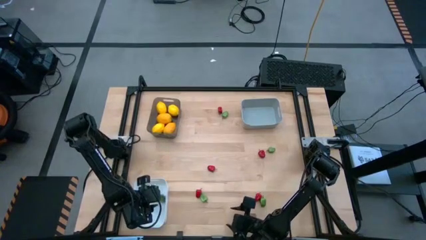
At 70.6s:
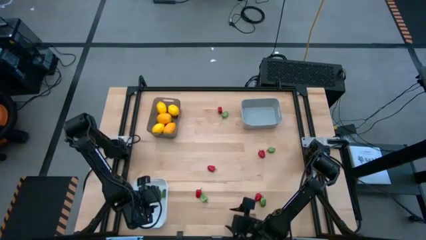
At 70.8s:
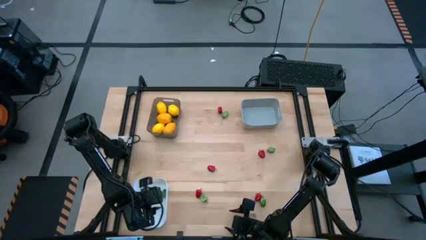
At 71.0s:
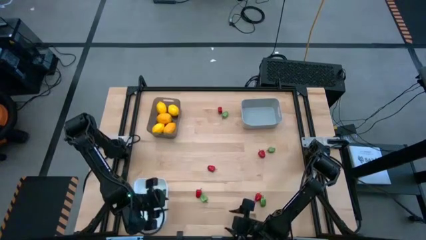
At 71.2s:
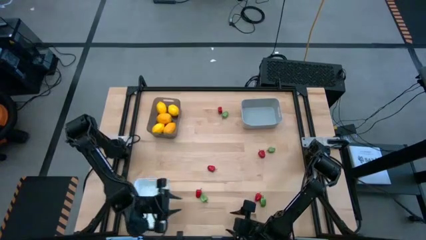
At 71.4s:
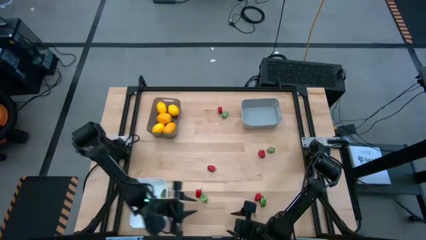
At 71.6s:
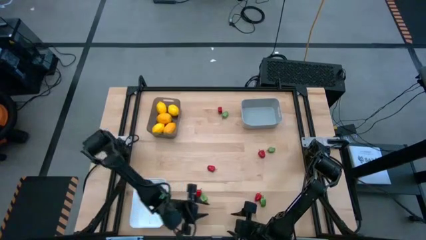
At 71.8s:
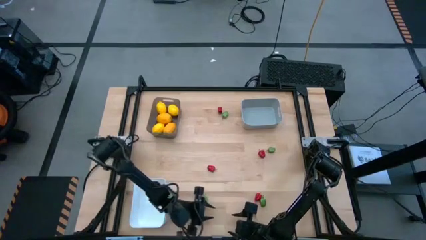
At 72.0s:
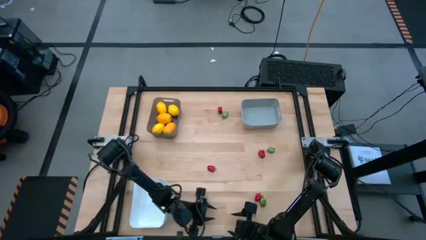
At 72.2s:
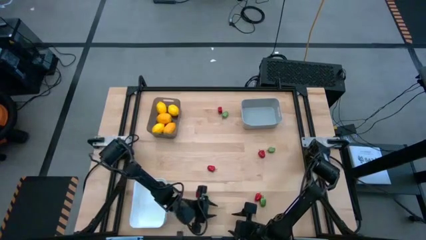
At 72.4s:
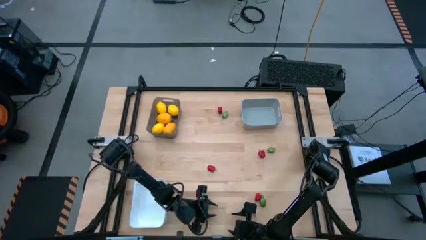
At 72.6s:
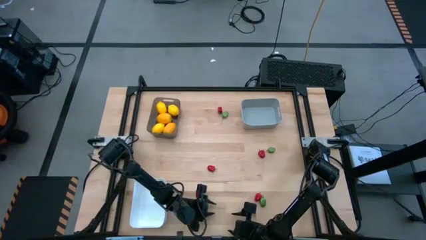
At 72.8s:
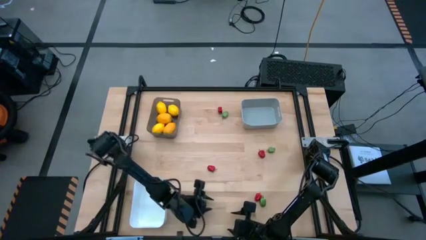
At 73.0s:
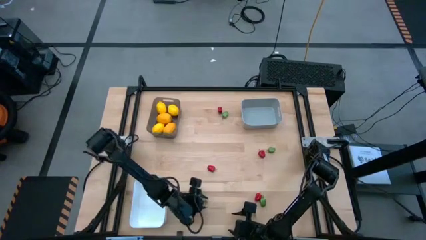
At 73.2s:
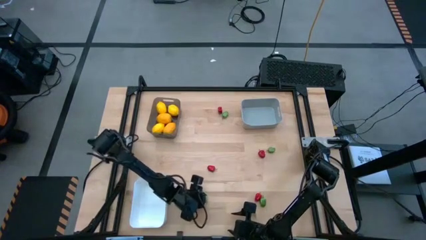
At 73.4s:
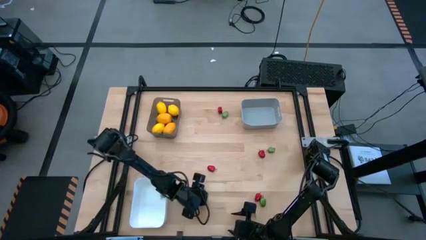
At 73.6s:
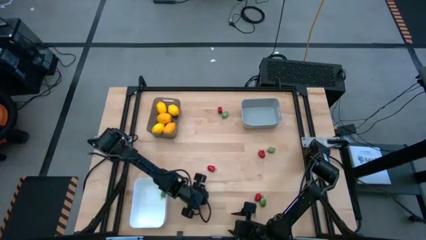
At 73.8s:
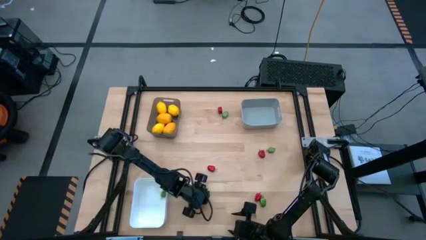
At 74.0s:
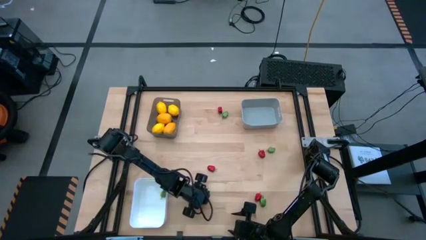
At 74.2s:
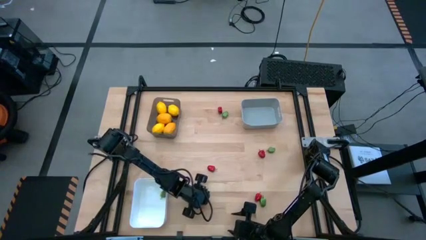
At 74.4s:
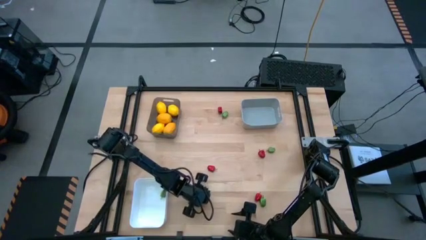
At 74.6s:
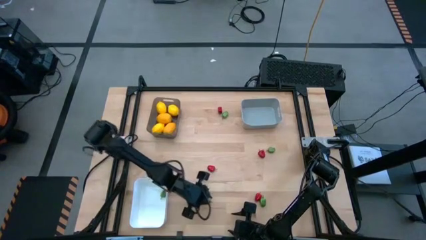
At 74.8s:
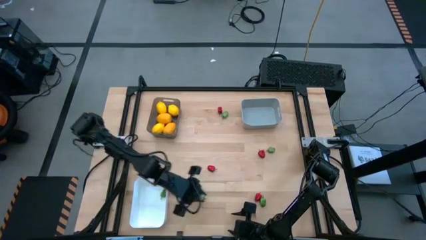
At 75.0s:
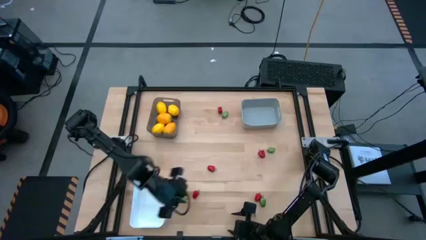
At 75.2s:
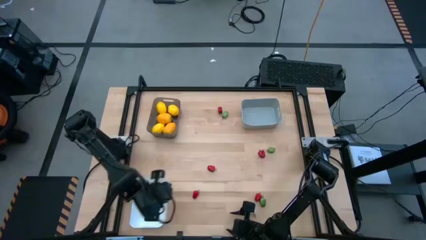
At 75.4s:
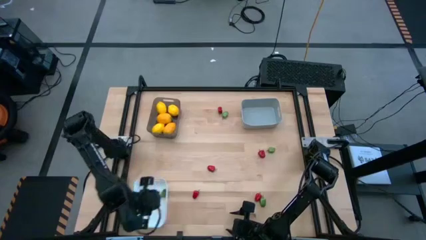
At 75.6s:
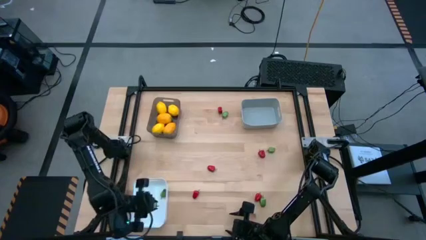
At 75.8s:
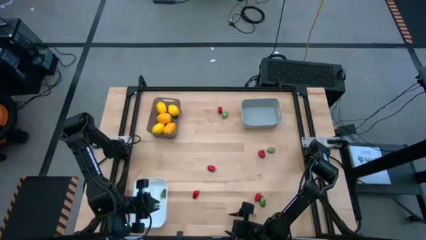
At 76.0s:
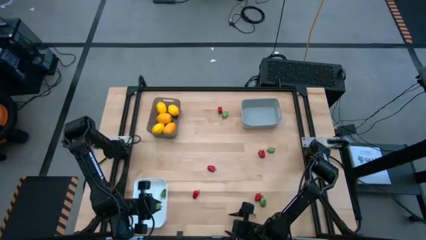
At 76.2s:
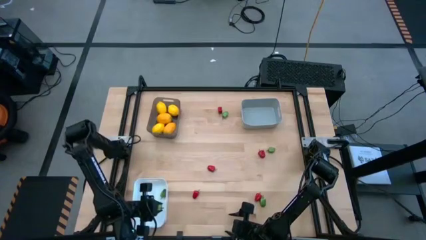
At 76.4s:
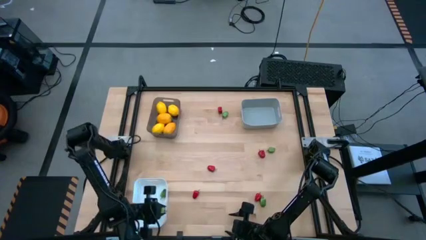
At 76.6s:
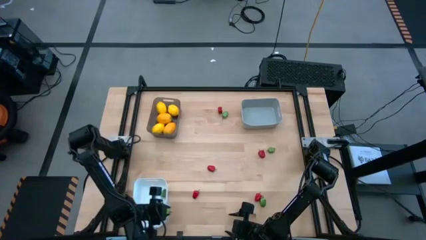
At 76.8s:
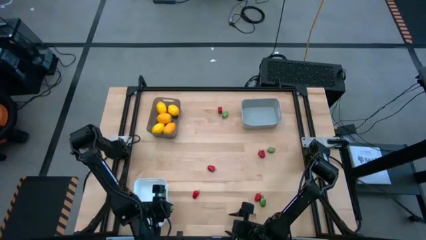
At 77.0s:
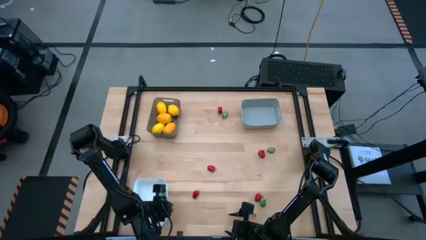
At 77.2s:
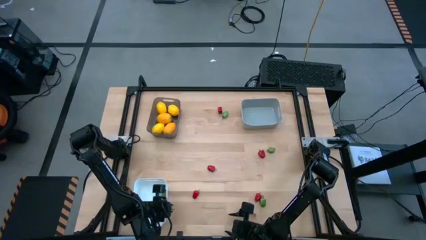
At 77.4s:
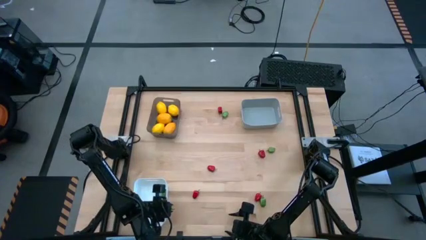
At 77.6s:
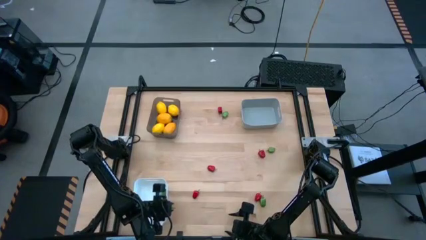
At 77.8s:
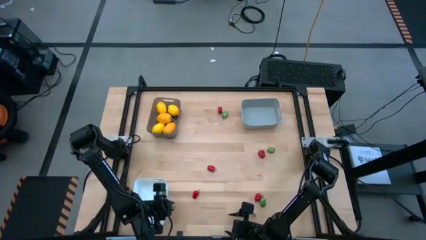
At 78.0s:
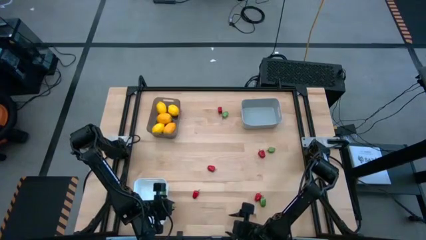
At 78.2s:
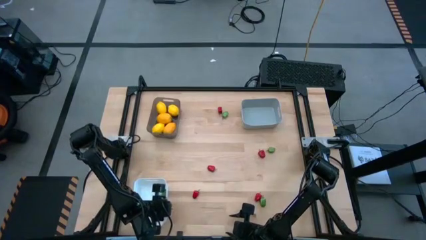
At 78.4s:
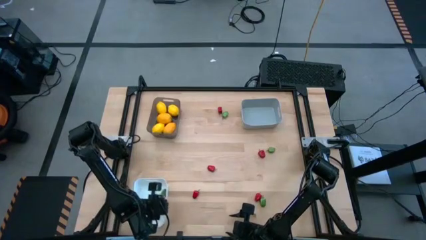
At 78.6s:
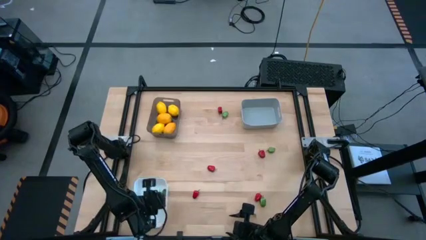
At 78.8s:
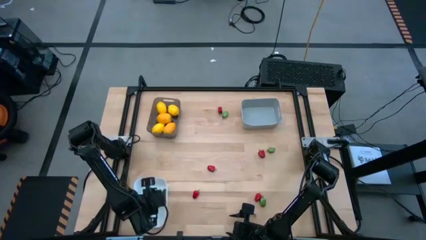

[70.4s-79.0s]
Task: Sort produce into baskets
Put the green bell pepper into the white bin

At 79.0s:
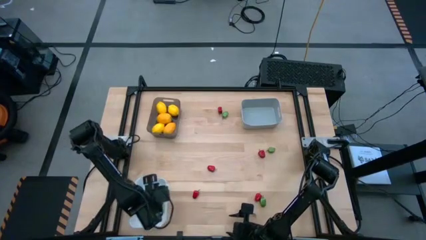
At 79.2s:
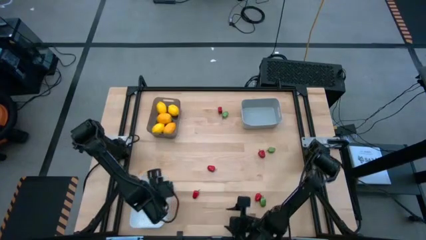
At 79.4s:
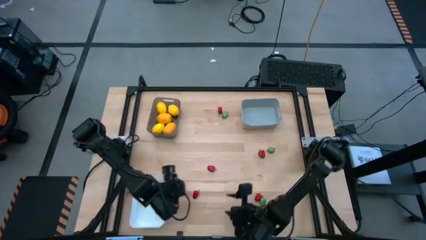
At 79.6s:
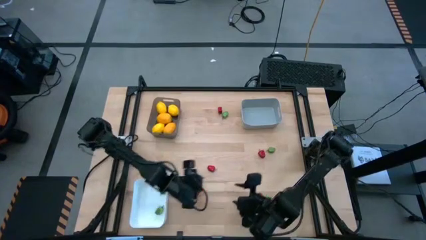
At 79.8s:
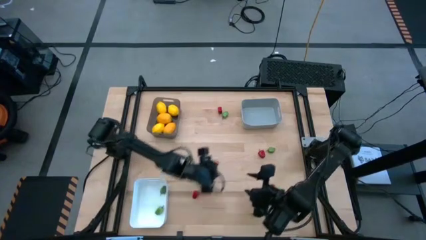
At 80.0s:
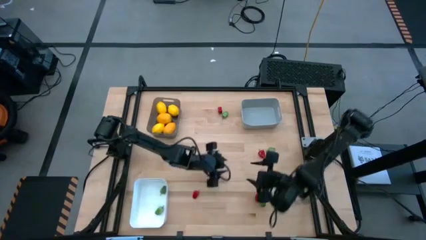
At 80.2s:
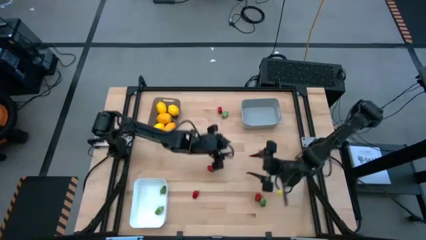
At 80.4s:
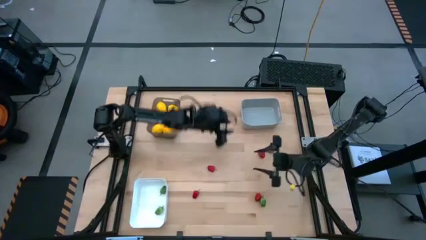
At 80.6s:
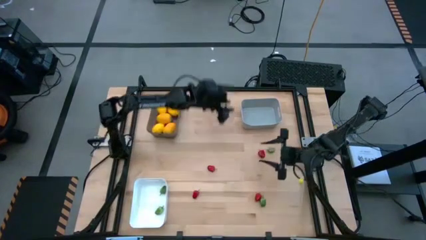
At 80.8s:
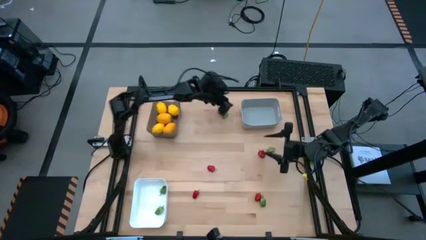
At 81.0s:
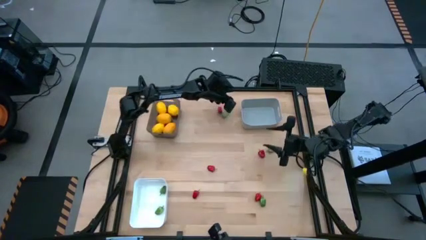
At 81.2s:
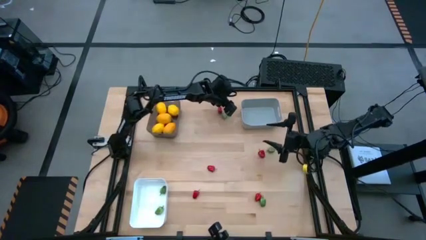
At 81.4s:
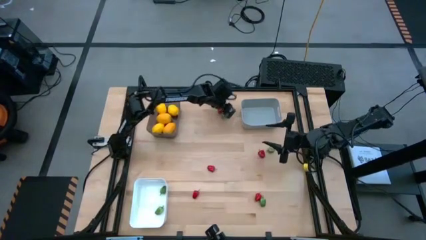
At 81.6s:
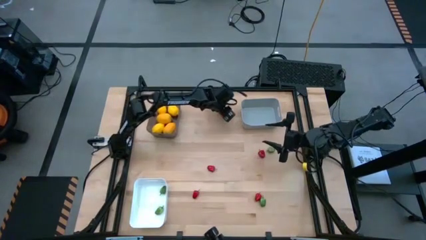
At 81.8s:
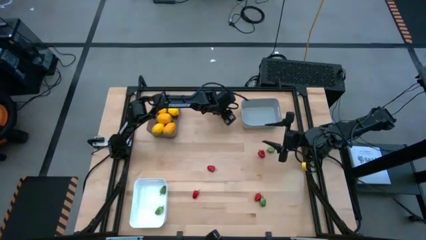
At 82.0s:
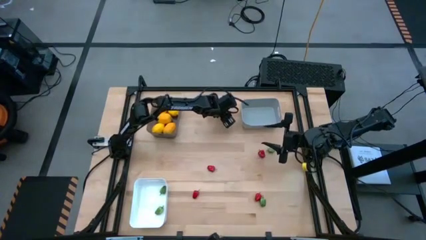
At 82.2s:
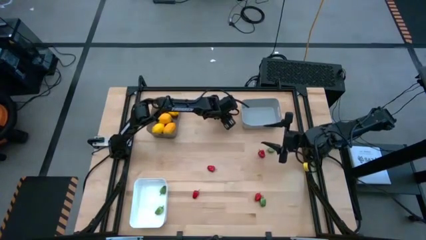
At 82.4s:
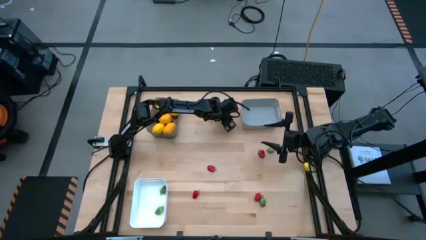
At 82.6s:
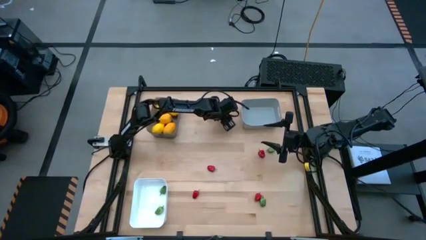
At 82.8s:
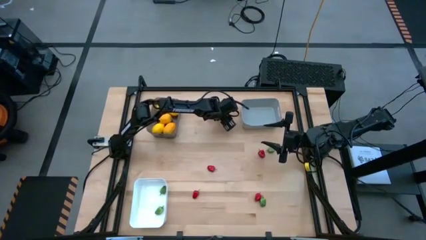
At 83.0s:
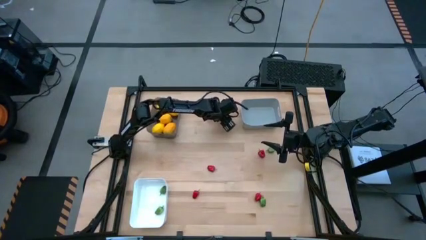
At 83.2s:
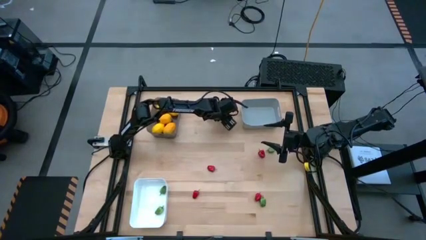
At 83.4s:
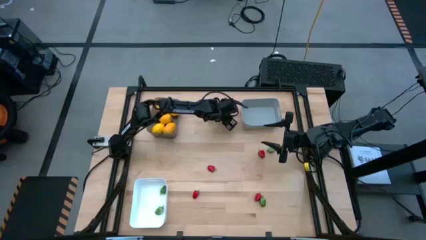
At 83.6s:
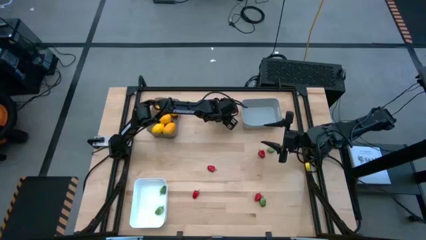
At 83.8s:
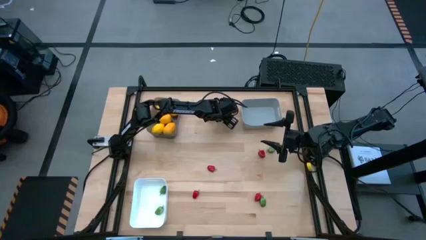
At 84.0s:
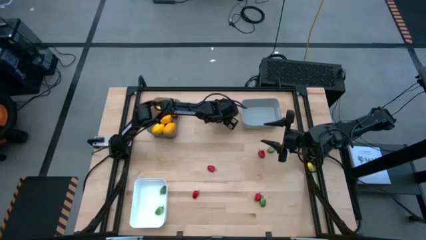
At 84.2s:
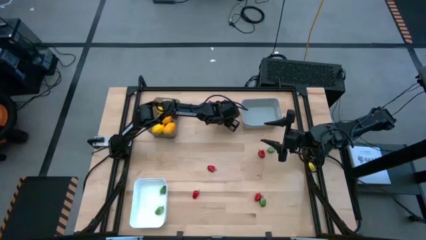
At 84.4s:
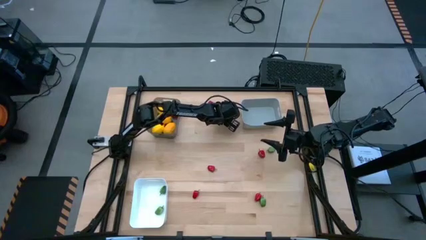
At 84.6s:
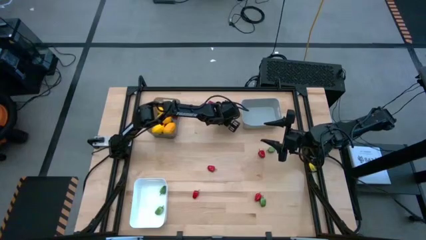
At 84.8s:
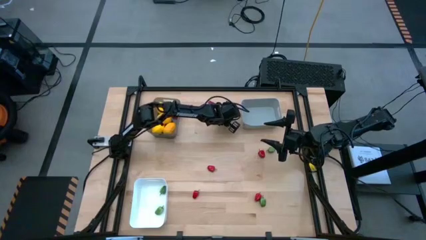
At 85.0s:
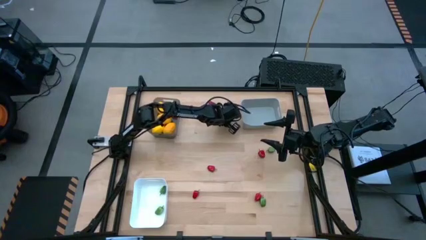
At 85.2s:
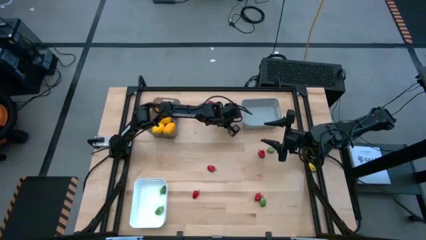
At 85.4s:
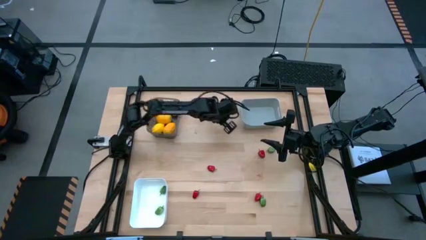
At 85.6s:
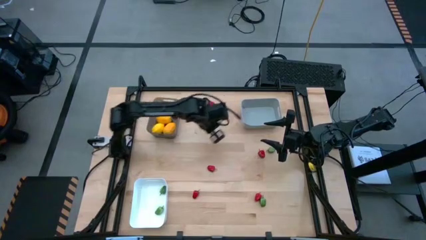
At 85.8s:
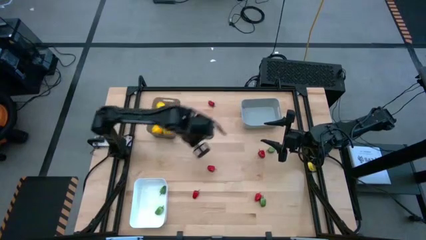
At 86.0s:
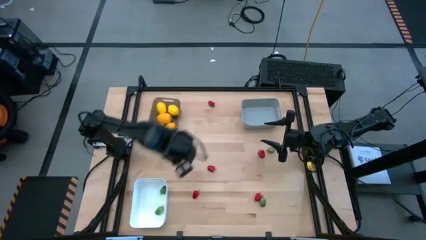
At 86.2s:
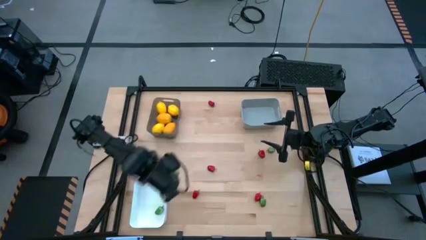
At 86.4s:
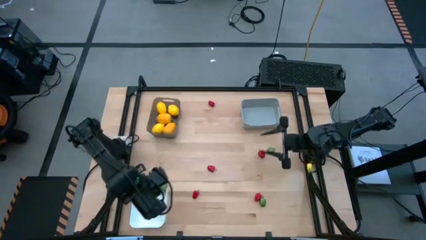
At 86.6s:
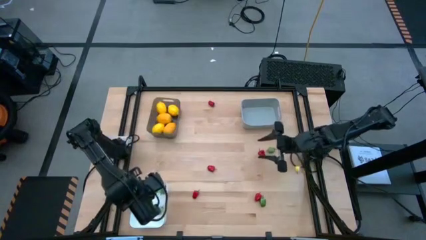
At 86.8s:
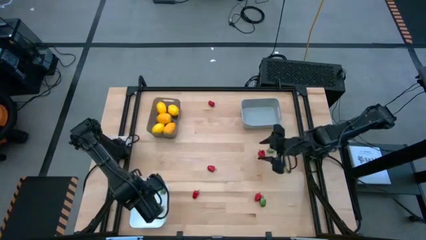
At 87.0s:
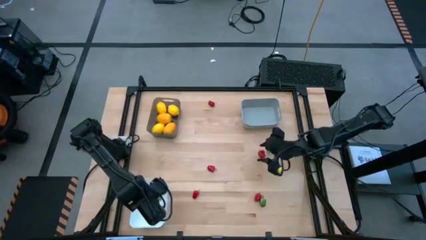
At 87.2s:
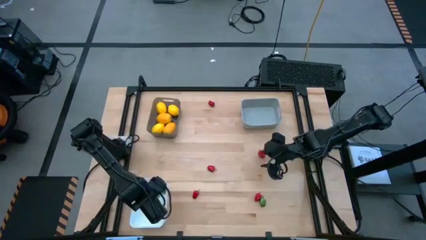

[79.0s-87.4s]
Put the green bell pepper into the white bin
